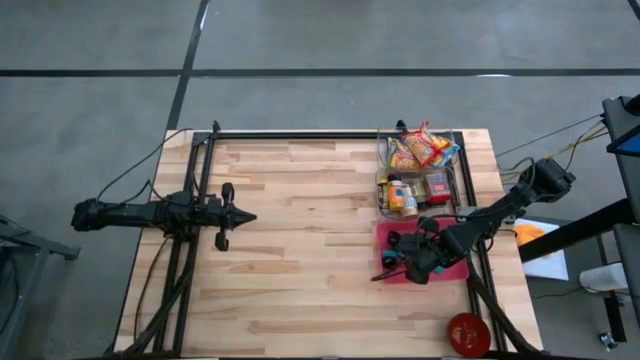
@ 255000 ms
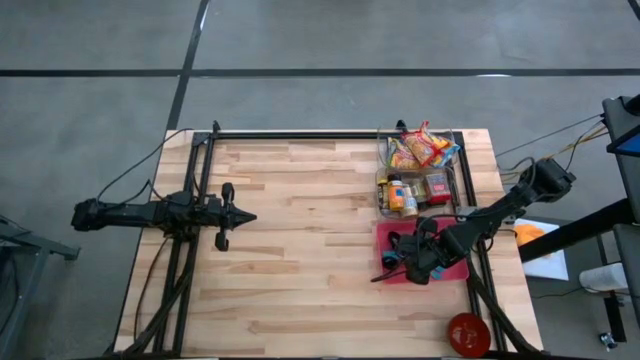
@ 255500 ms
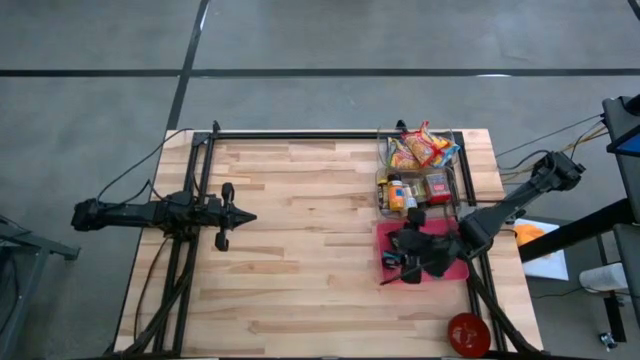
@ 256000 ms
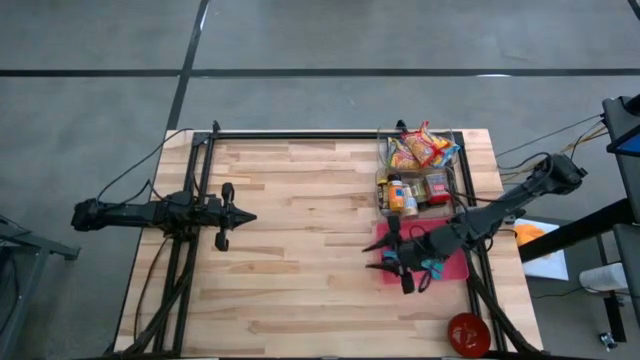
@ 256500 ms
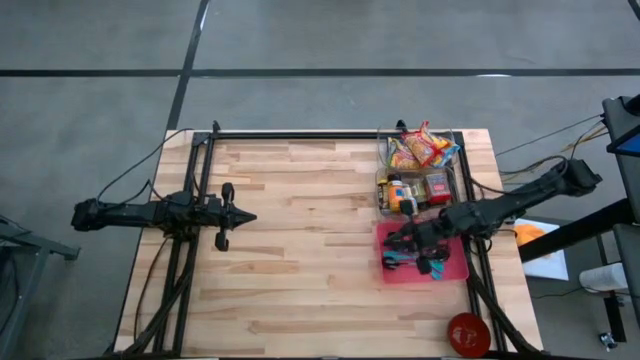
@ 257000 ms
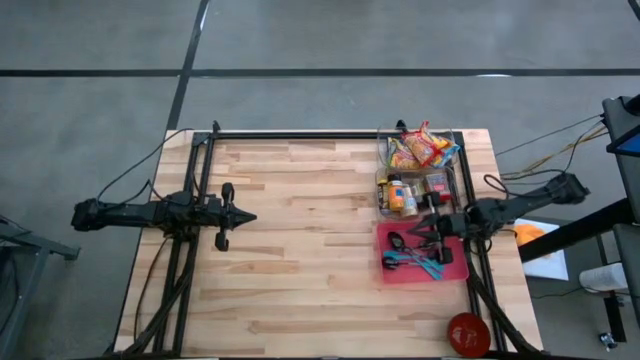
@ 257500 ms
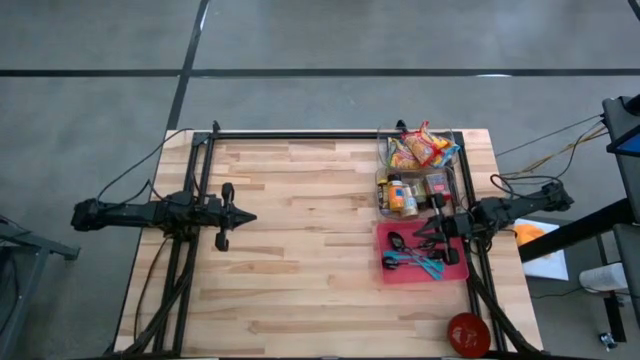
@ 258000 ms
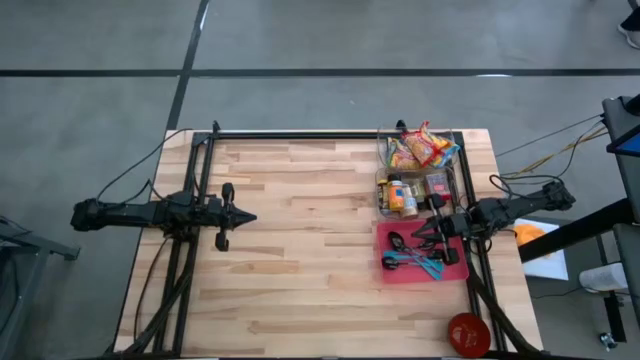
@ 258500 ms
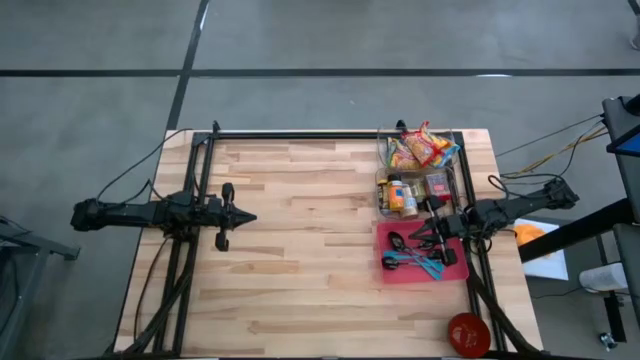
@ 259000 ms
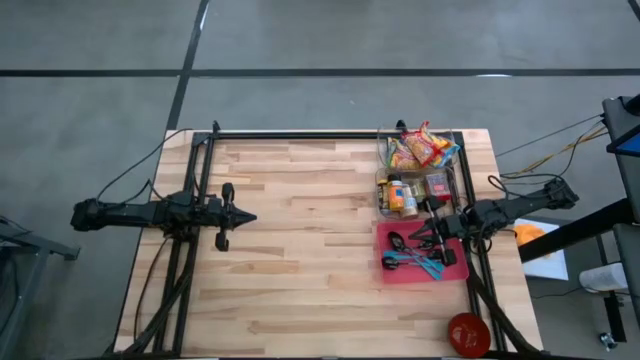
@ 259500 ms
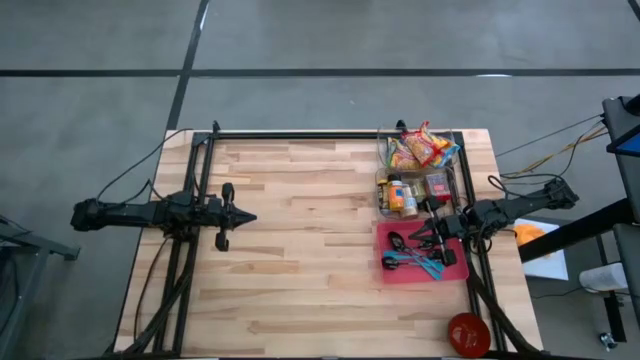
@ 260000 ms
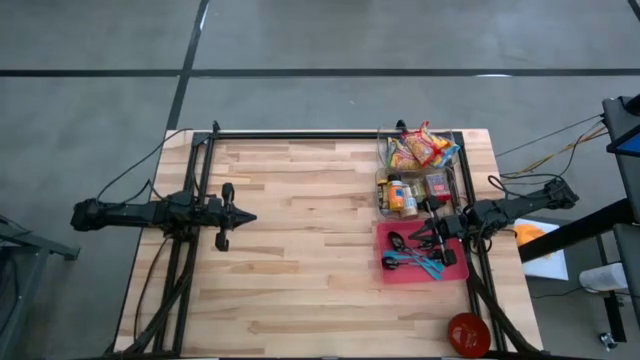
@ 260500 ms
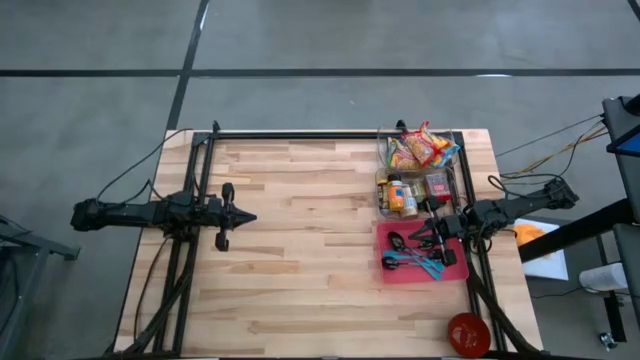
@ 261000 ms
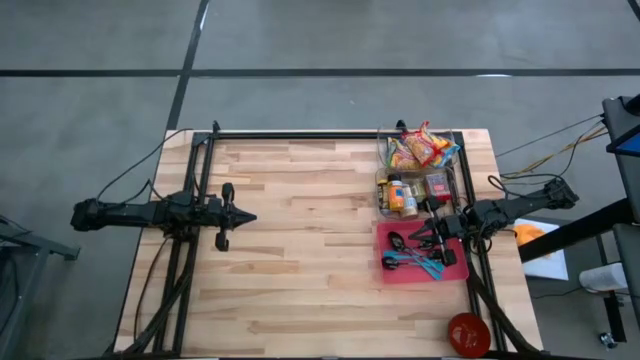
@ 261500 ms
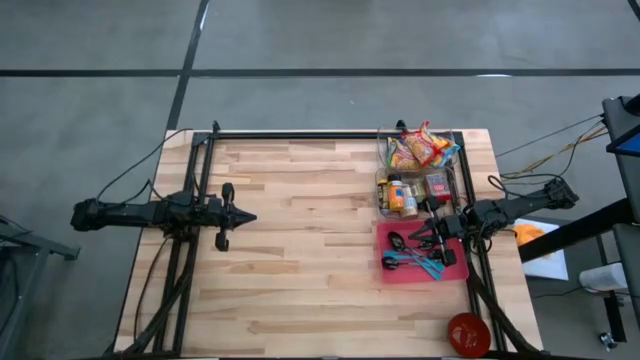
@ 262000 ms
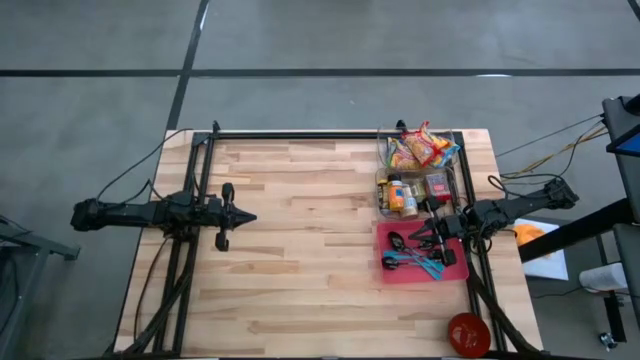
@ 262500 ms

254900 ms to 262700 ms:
Return to Home Position
